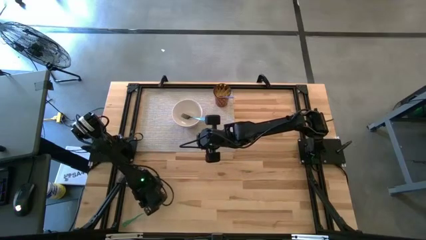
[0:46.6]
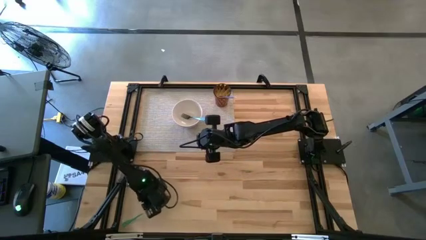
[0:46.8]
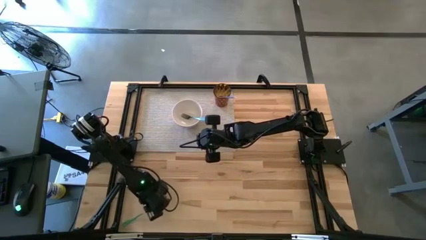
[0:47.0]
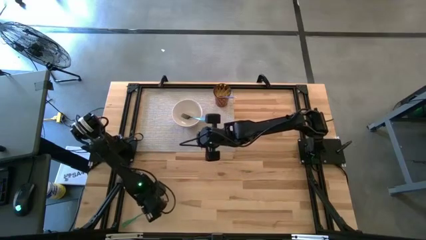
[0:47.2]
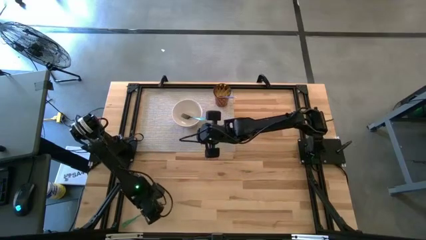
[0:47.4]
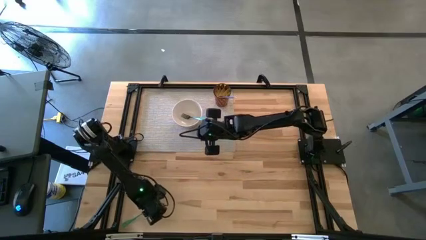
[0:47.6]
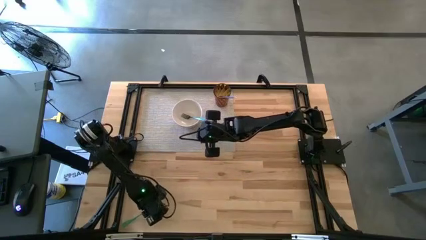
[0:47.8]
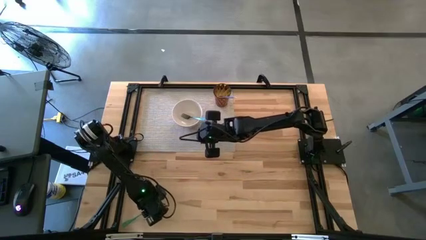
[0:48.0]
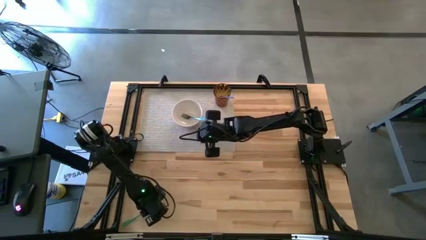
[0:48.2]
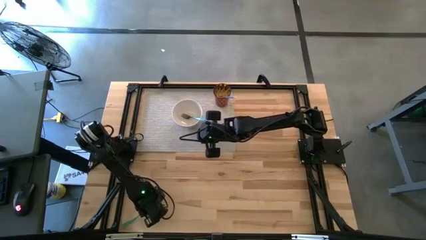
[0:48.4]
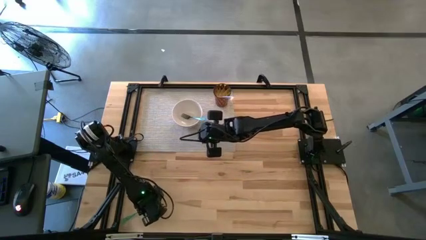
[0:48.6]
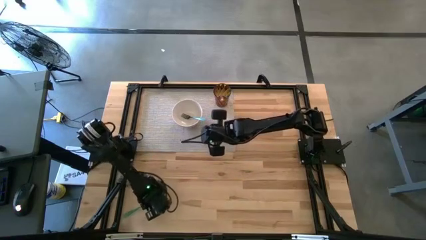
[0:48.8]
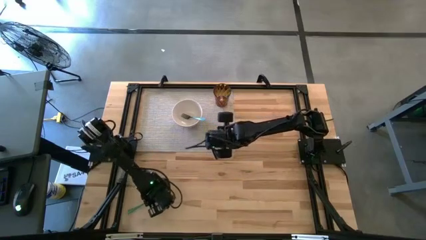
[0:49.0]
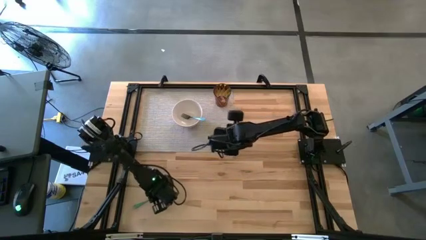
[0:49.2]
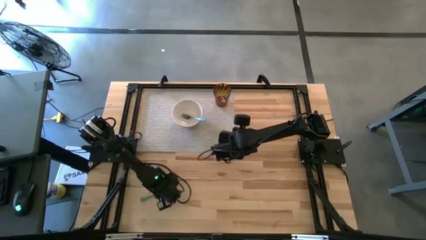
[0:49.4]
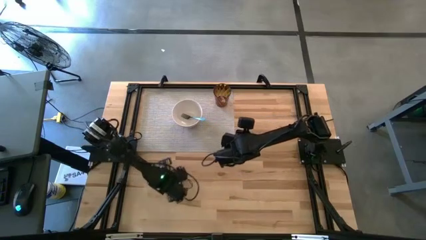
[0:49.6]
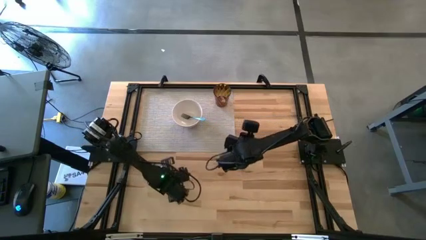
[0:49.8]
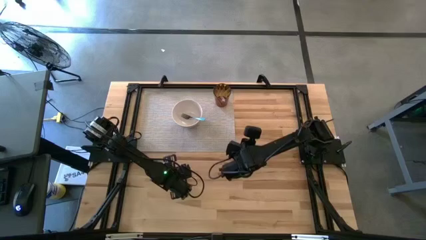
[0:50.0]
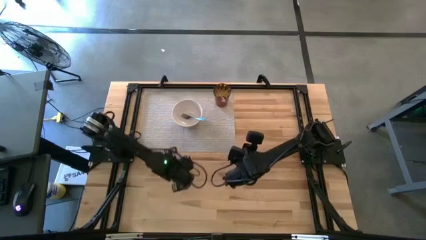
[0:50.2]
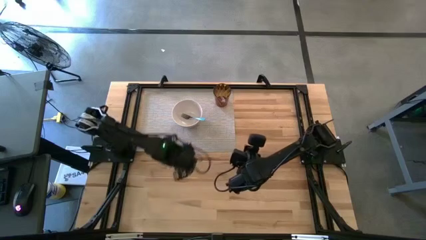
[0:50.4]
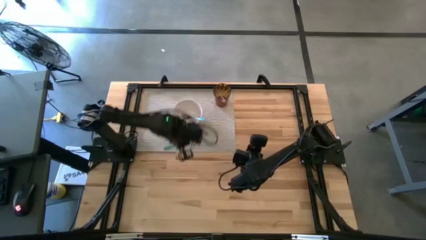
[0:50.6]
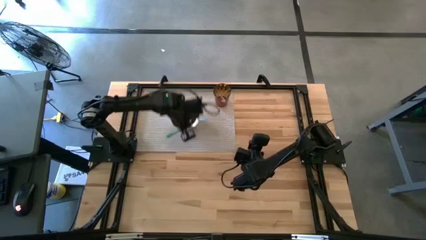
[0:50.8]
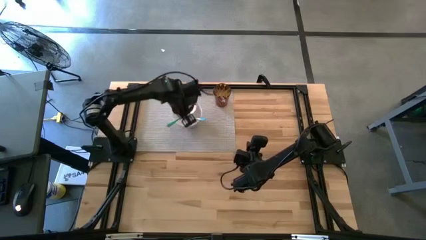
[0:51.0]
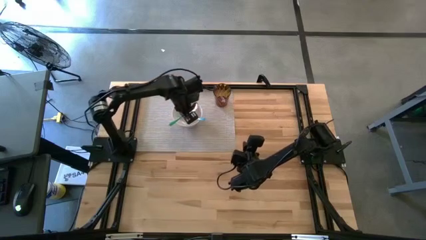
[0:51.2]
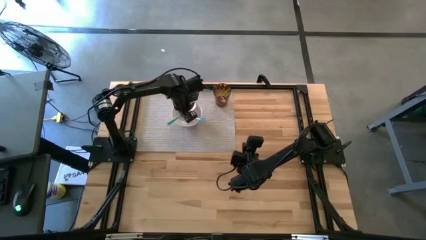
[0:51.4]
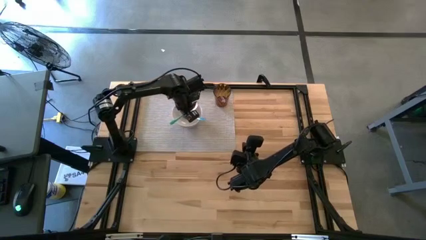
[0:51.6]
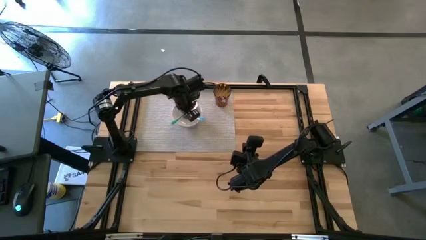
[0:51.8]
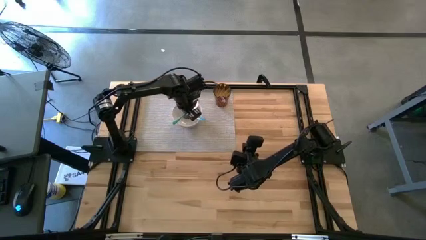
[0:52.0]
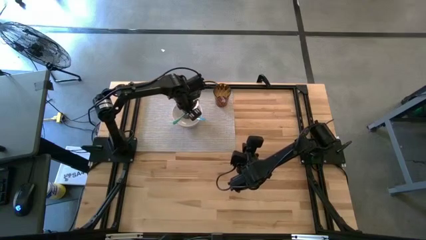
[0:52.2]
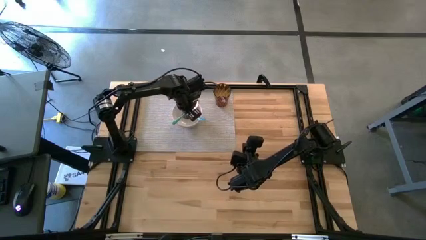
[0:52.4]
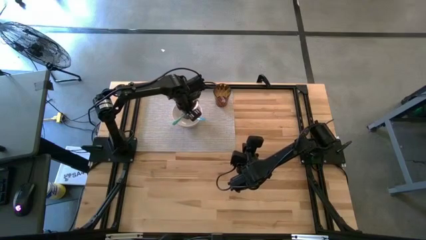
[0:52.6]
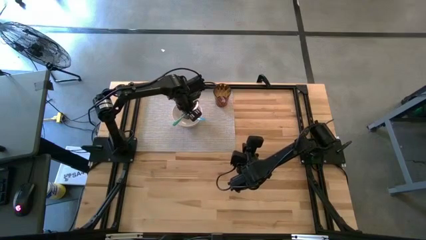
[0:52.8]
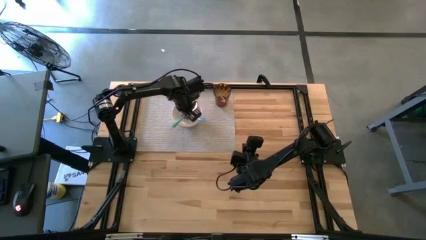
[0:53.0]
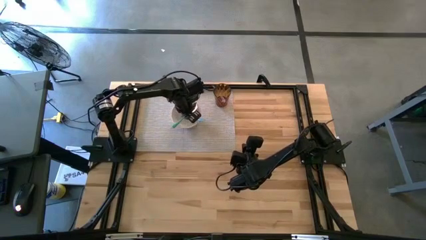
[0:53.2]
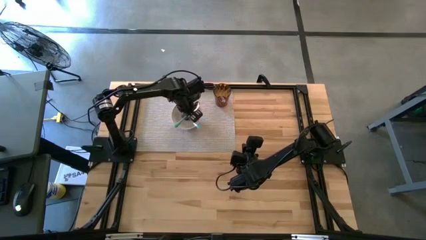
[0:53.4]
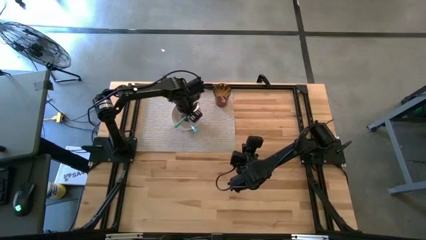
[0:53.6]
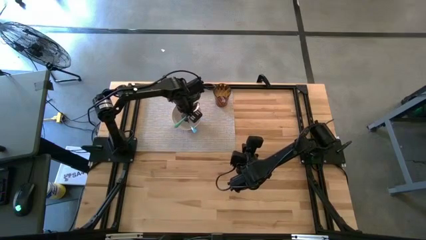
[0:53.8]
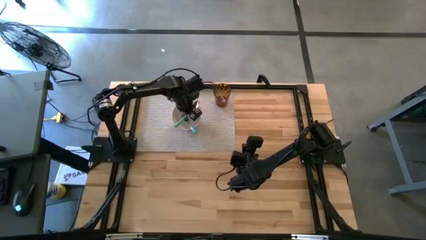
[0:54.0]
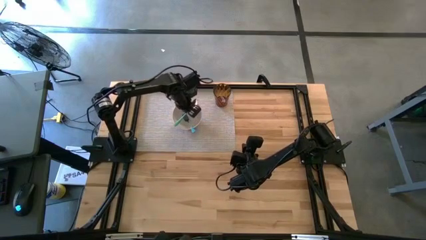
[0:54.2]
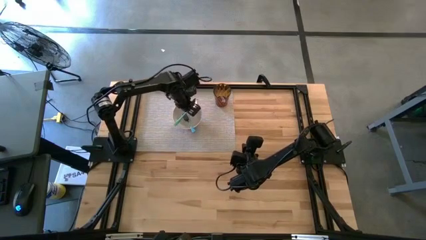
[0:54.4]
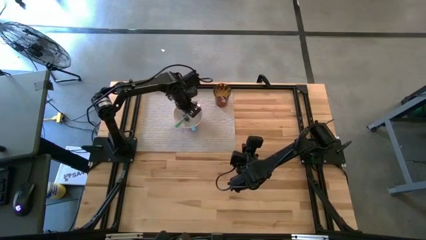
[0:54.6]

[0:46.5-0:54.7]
Task: Pick & Place Utensil
Put the green spoon into the white bowl

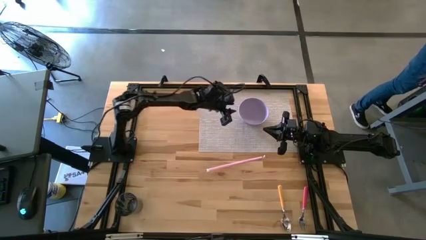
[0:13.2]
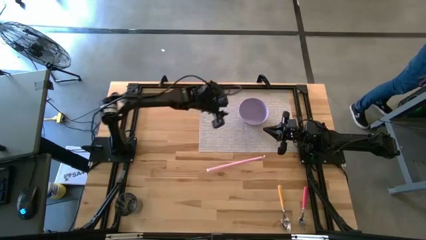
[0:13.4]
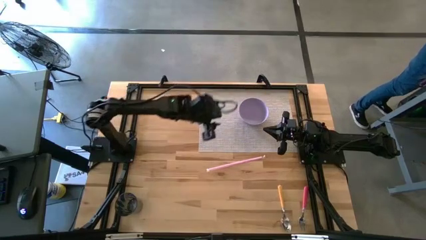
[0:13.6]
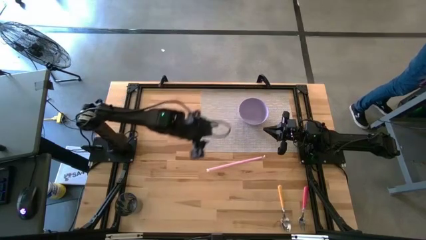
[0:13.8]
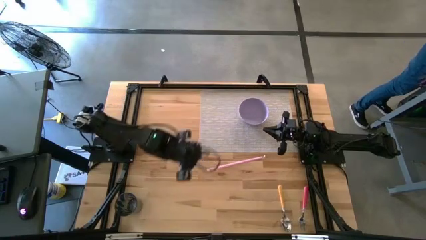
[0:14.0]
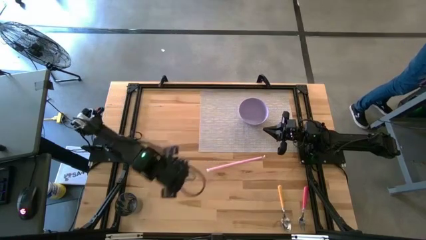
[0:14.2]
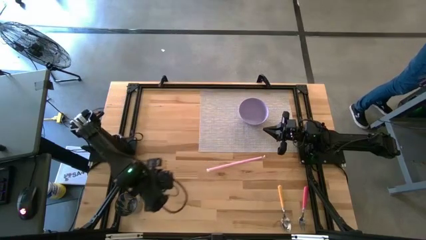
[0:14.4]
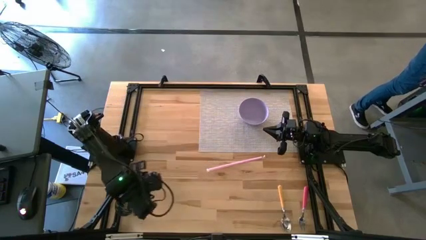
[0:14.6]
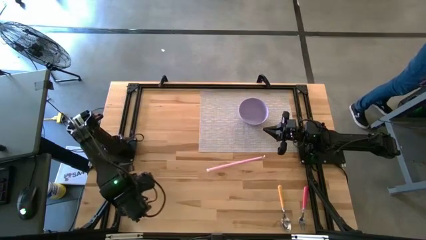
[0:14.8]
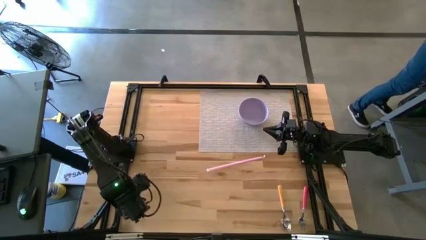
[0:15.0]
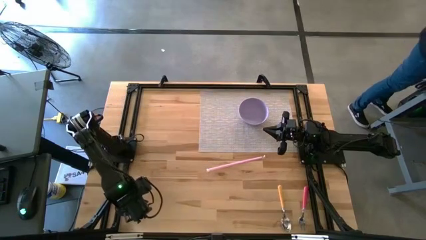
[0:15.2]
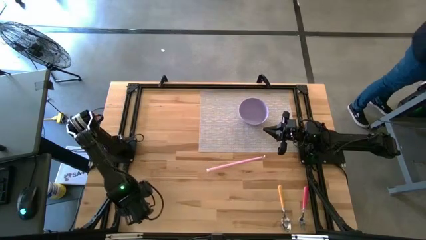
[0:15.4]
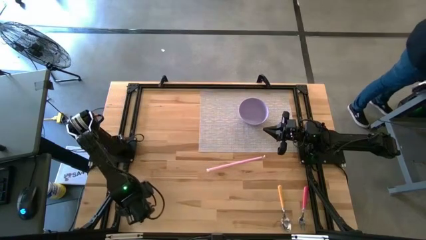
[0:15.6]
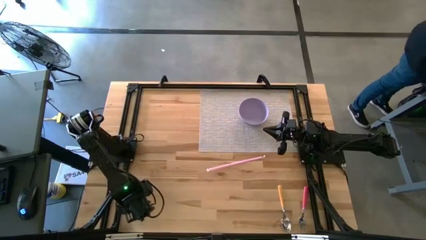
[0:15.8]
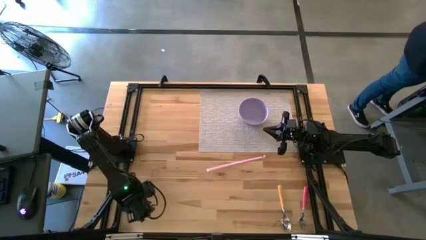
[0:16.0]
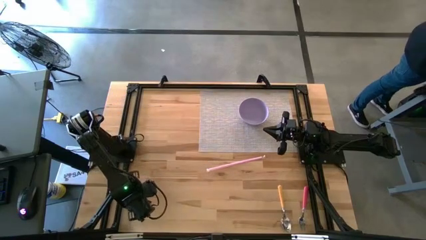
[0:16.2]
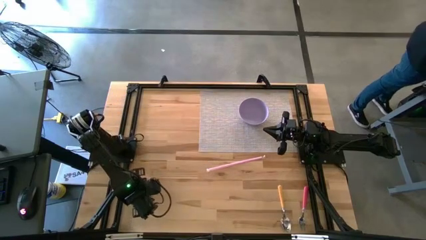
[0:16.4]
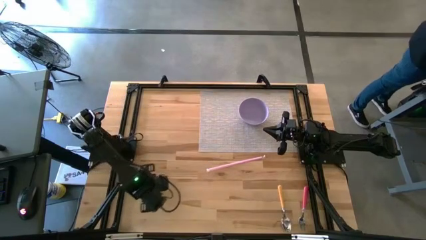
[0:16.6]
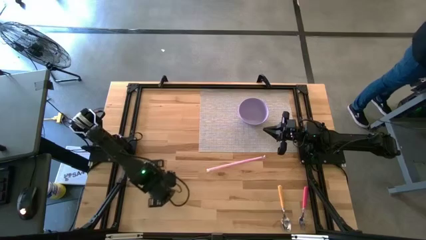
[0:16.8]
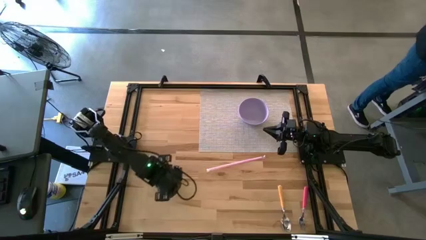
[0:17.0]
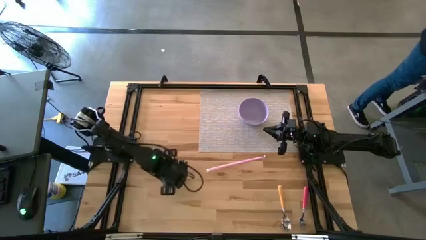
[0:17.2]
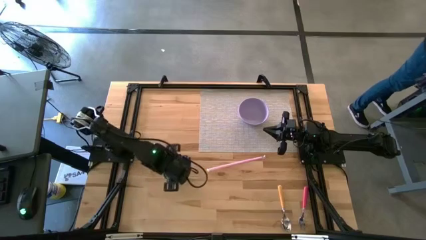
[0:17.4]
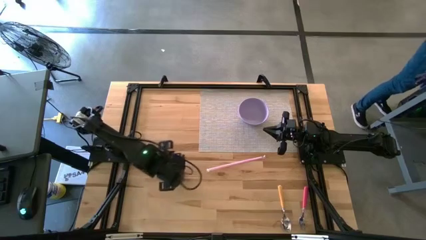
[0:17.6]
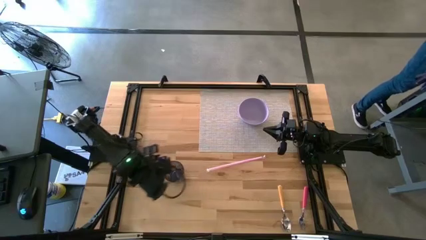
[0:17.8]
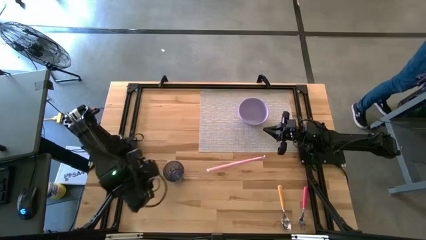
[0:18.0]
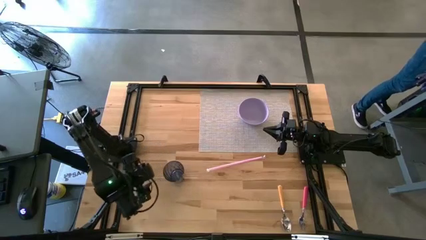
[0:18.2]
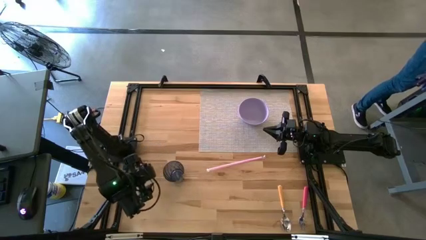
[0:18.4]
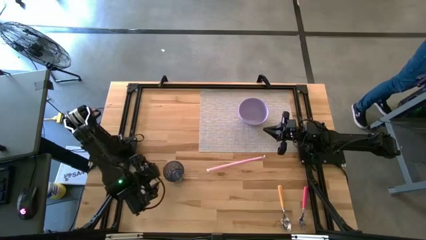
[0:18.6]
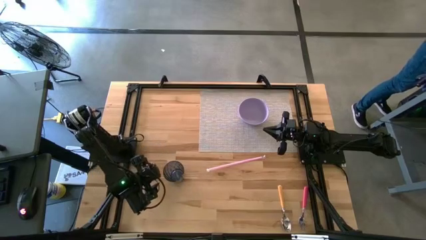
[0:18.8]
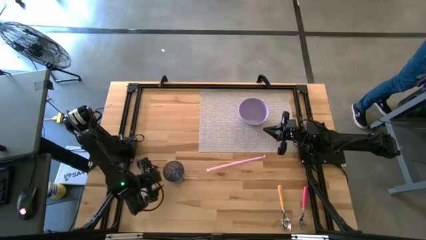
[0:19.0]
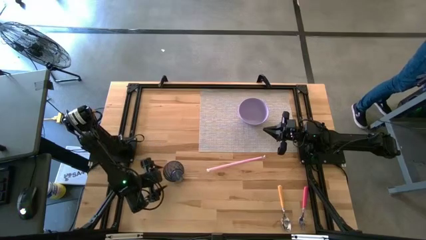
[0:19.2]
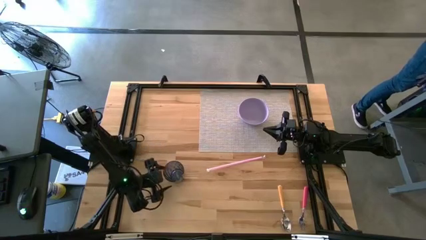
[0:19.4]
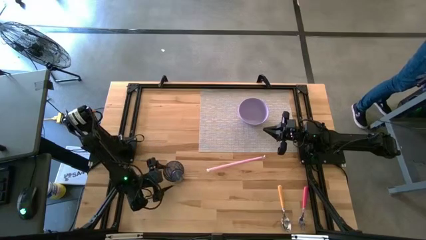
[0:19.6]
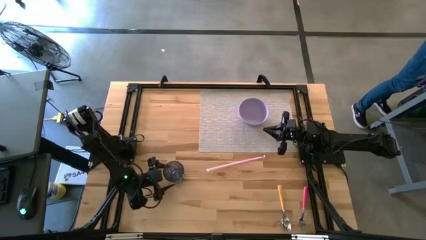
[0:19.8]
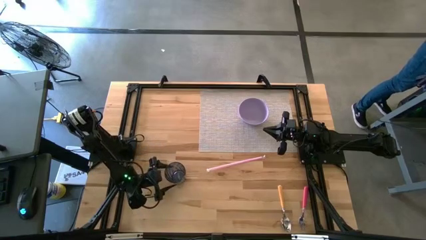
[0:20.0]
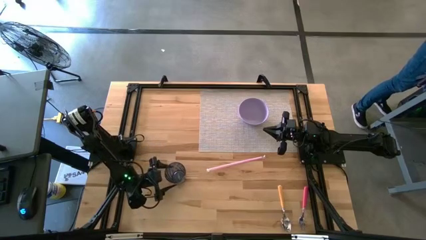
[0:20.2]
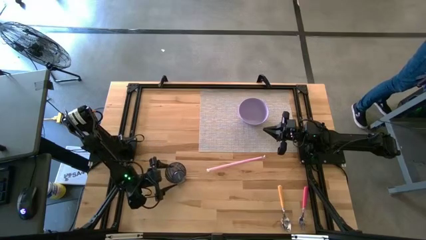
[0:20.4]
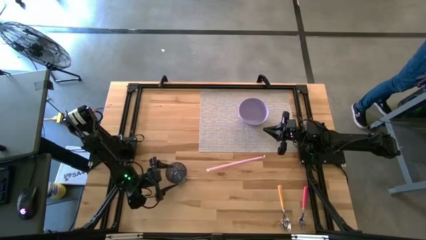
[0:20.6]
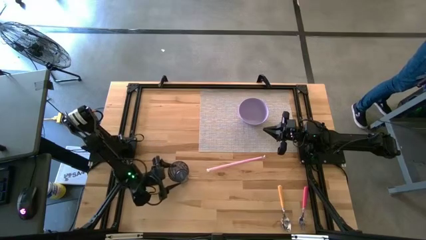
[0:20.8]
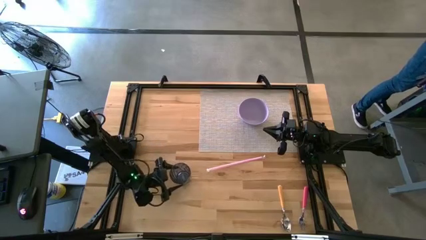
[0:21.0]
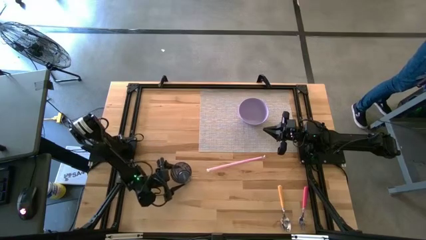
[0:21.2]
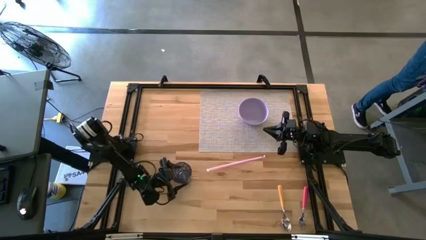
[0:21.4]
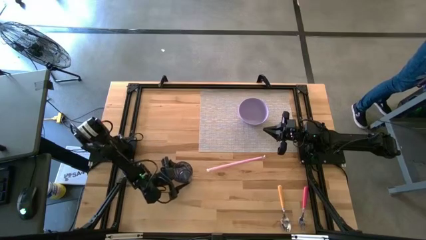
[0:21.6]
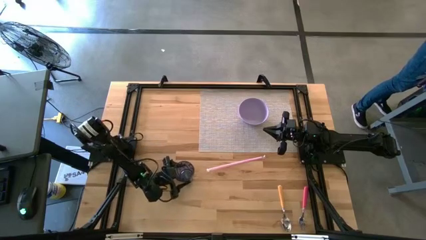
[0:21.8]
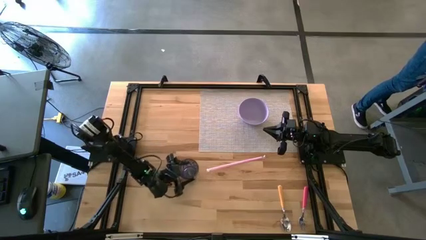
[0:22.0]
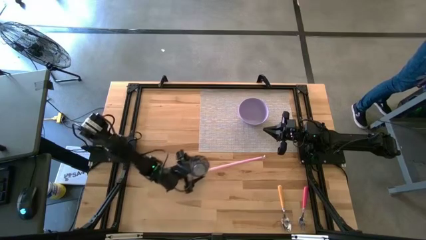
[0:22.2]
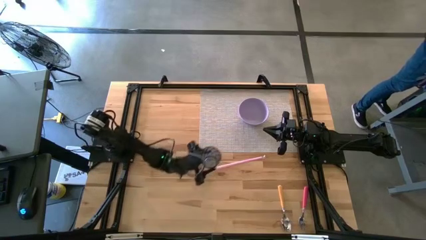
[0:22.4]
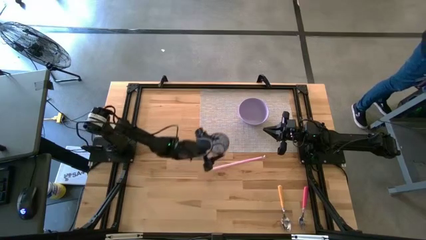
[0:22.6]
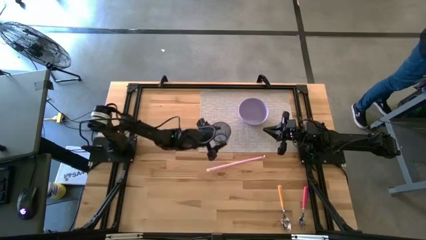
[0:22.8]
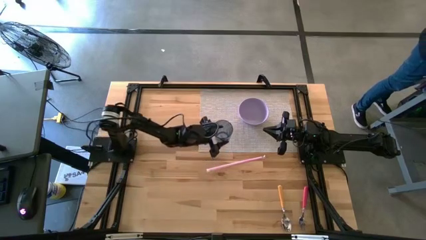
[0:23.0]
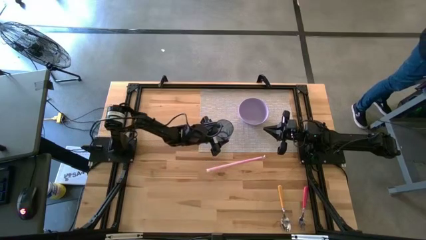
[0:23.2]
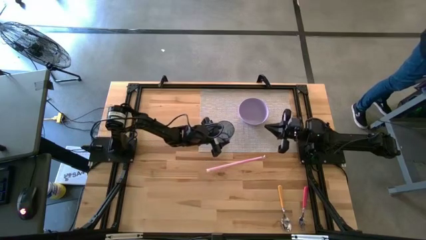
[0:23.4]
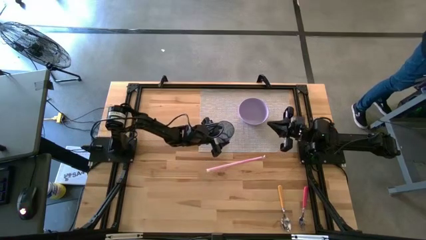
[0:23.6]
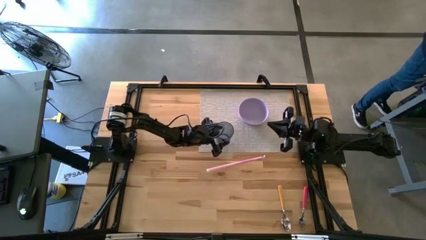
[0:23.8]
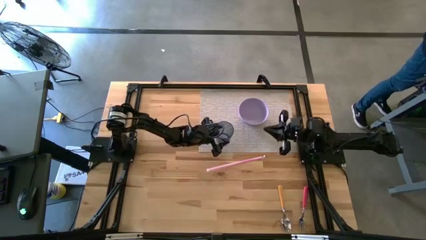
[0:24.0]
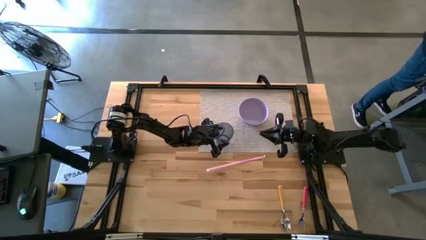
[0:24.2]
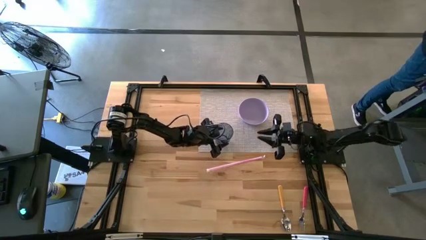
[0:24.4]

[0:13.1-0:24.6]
Task: Pick & Place Utensil
Put the blue cup on the gray mat to the top right of the violet bowl
